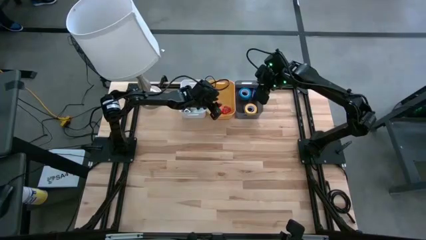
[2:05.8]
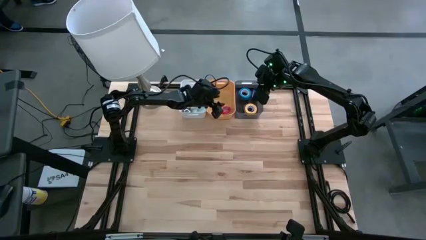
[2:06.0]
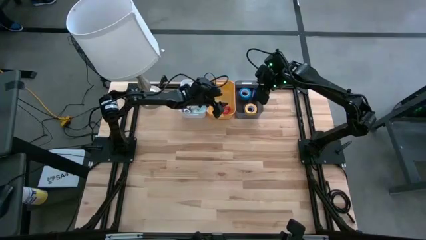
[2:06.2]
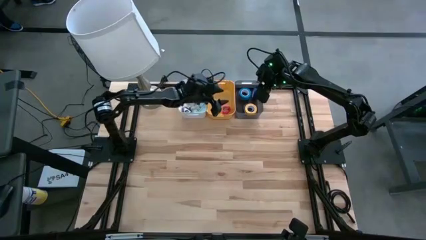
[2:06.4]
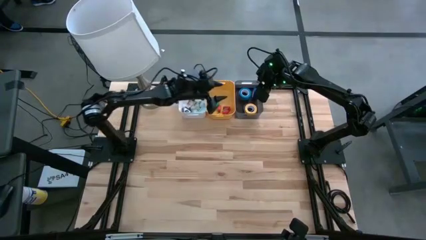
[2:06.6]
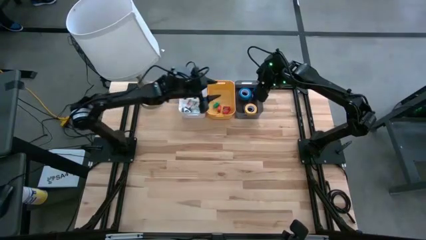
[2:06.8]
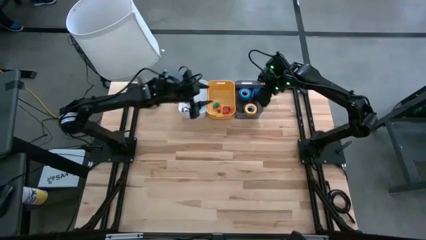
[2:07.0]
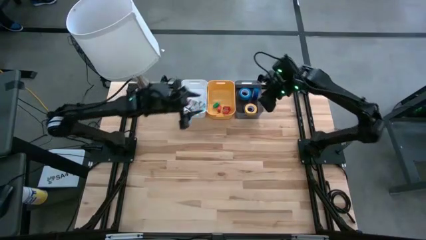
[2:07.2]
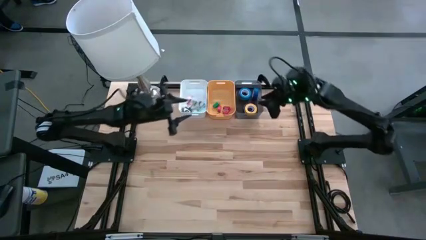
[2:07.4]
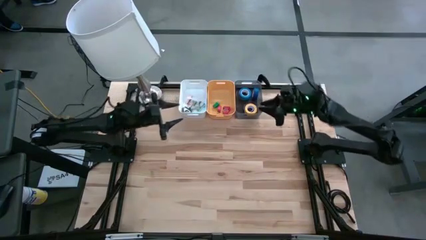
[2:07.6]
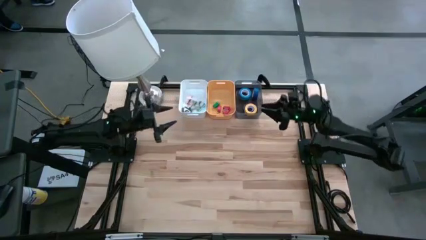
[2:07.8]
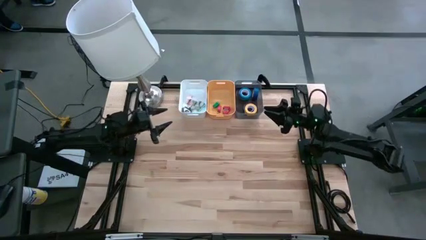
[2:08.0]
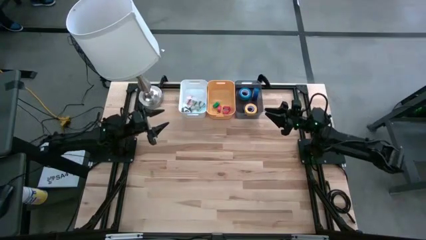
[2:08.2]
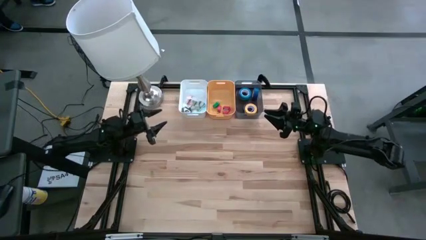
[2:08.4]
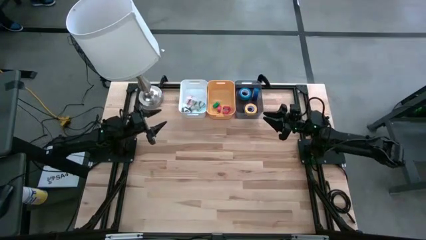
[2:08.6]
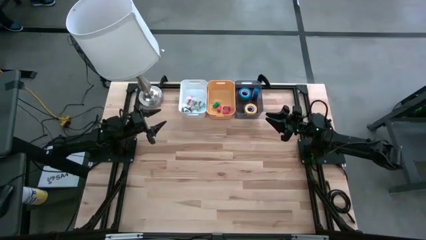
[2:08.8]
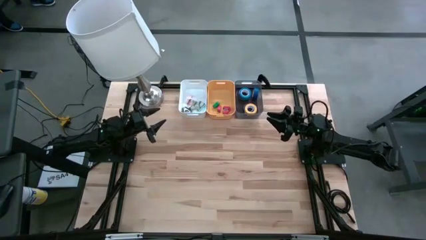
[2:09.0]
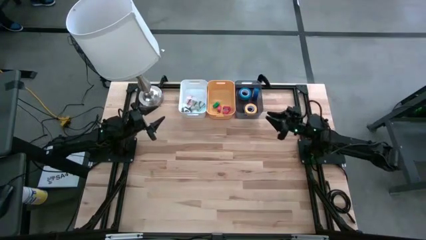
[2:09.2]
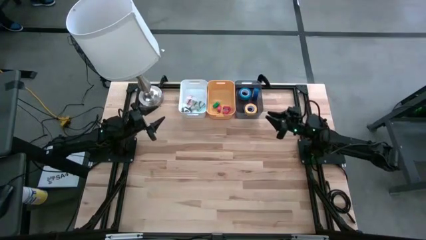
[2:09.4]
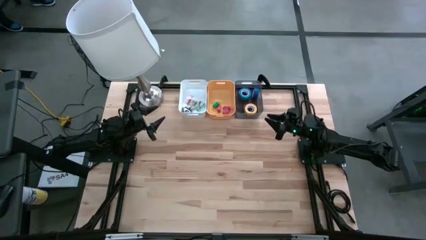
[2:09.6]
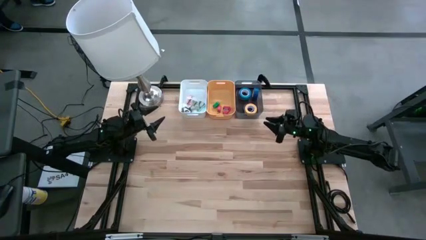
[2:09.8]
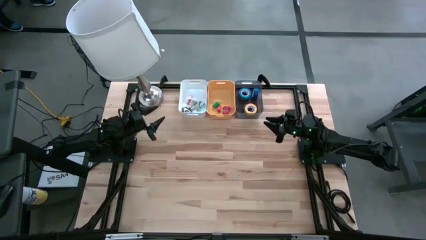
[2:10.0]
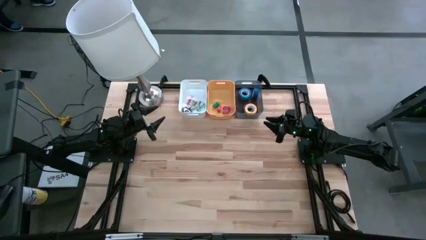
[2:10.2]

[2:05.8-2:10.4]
Task: Pick and place Stapler, Stapler remover, tape
Return to Home Position

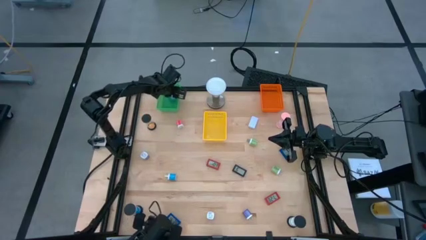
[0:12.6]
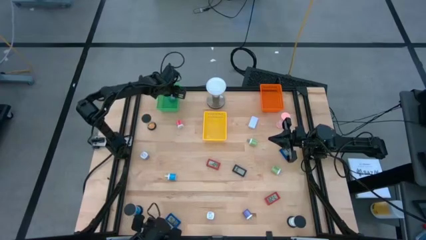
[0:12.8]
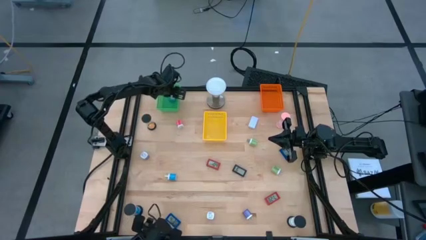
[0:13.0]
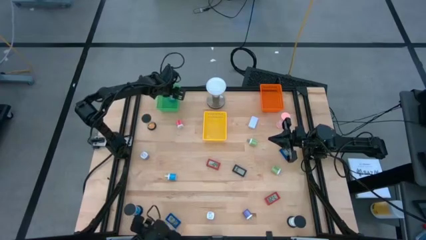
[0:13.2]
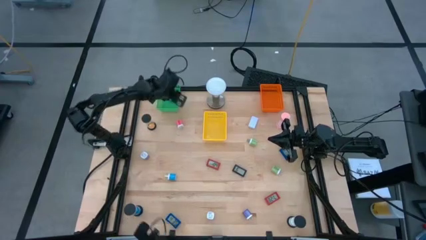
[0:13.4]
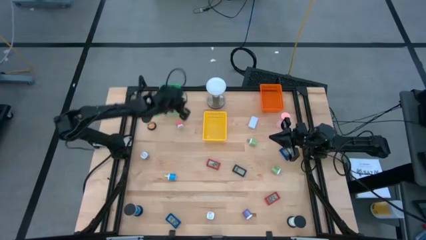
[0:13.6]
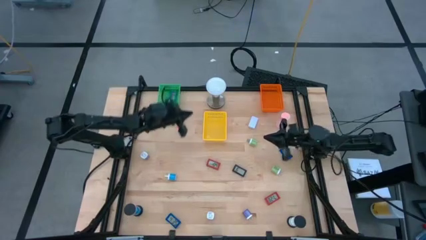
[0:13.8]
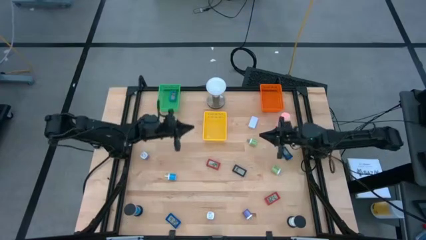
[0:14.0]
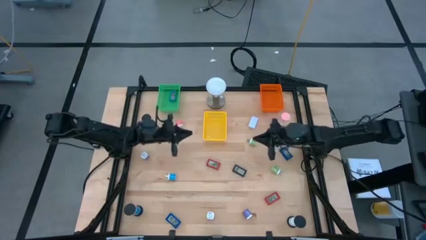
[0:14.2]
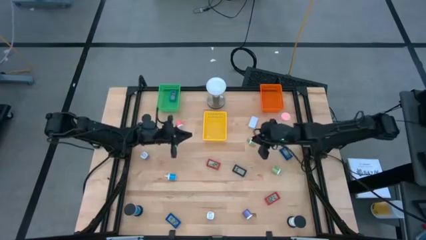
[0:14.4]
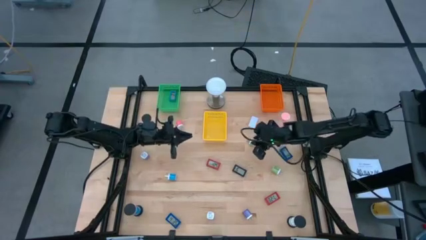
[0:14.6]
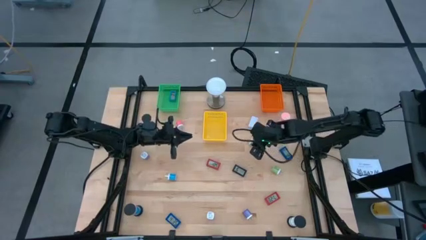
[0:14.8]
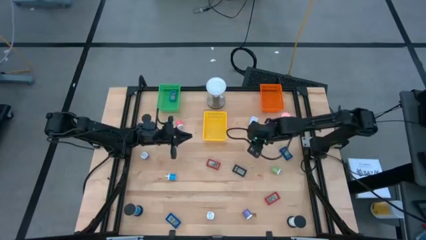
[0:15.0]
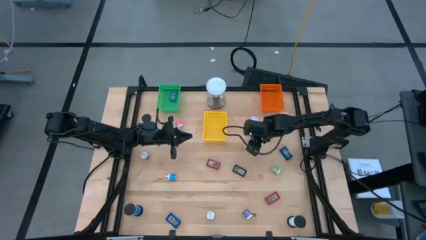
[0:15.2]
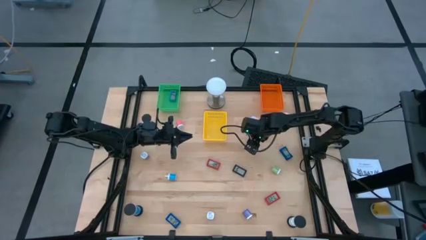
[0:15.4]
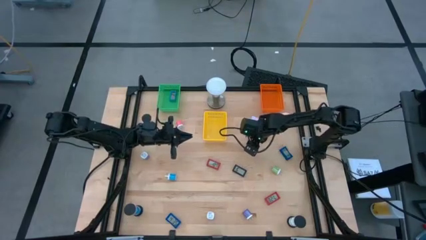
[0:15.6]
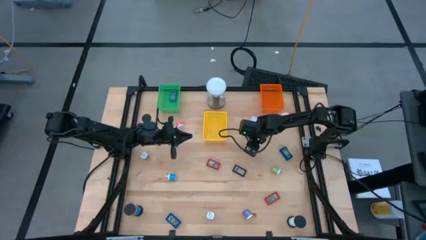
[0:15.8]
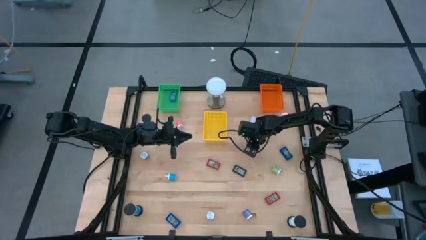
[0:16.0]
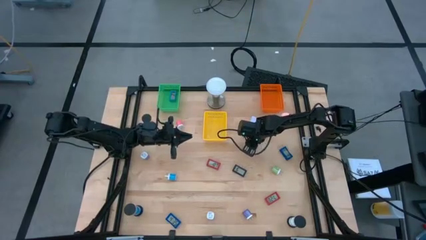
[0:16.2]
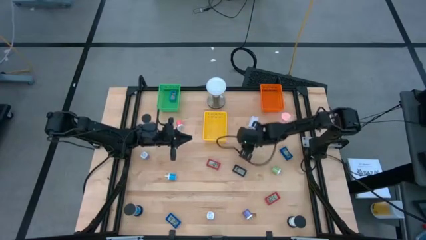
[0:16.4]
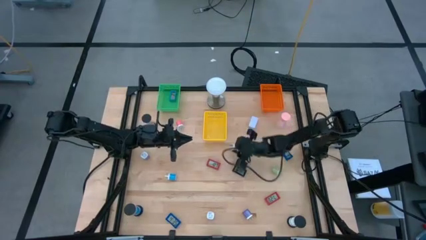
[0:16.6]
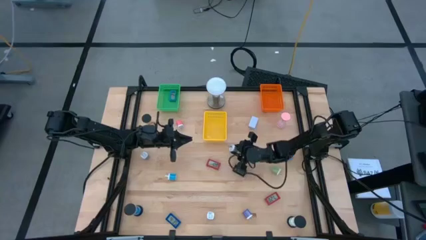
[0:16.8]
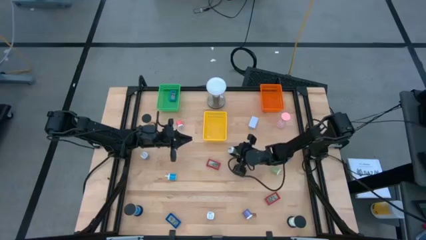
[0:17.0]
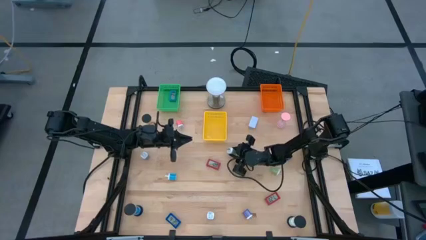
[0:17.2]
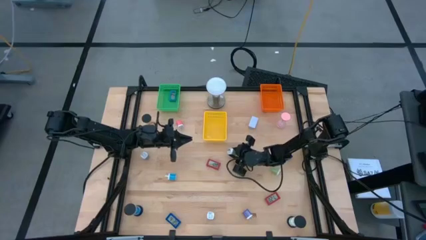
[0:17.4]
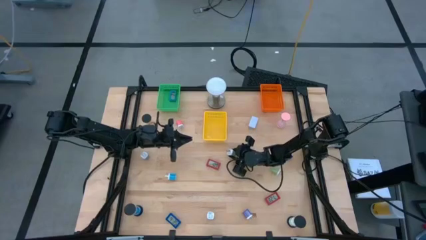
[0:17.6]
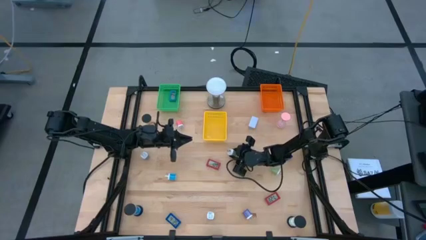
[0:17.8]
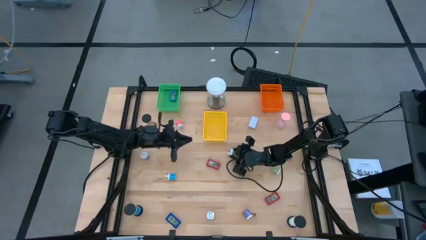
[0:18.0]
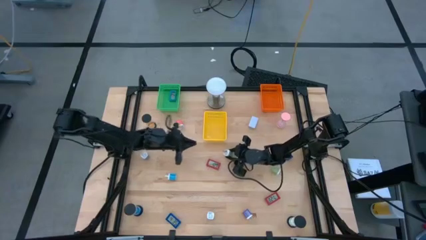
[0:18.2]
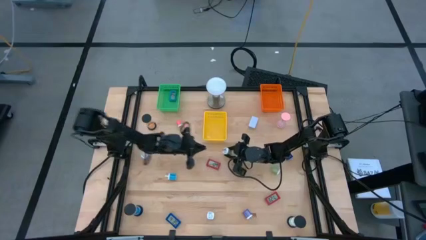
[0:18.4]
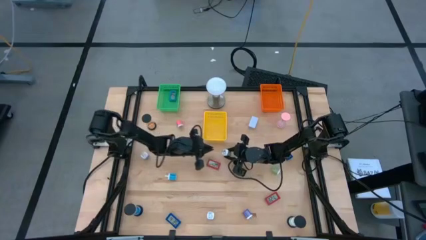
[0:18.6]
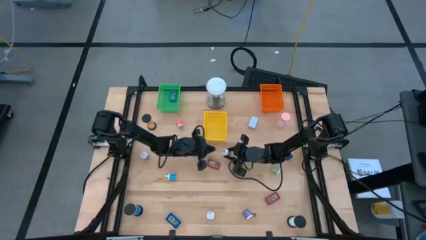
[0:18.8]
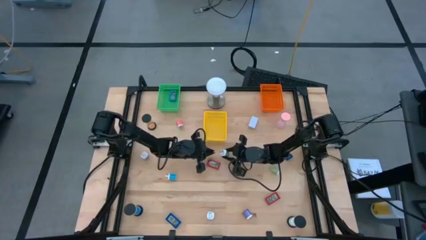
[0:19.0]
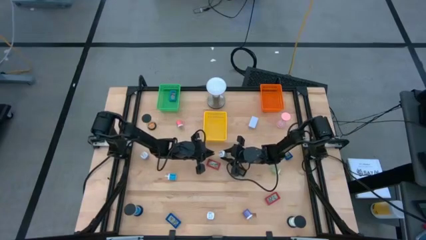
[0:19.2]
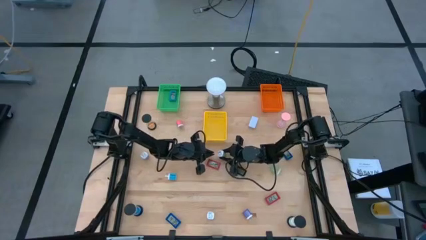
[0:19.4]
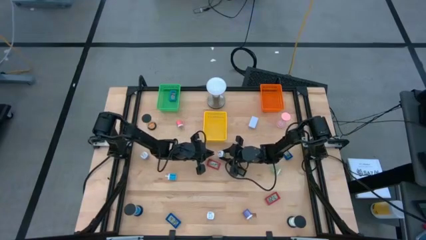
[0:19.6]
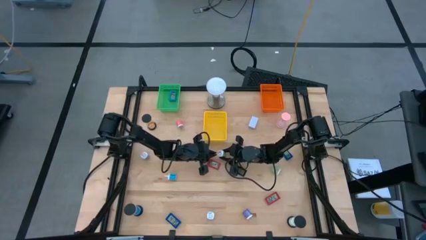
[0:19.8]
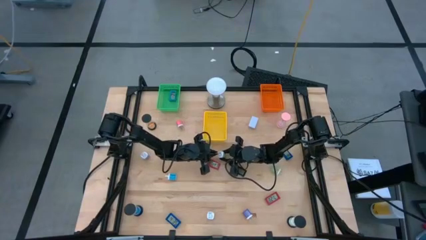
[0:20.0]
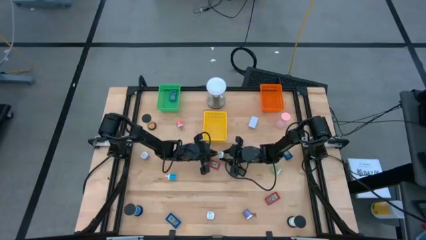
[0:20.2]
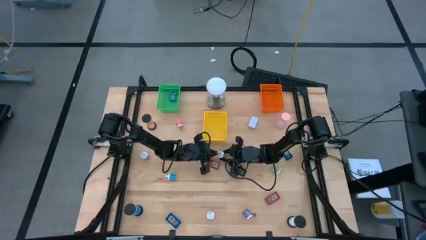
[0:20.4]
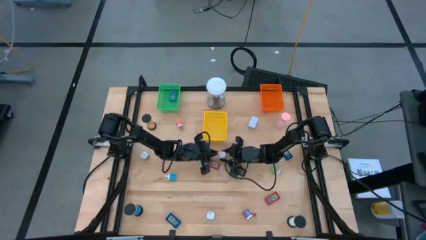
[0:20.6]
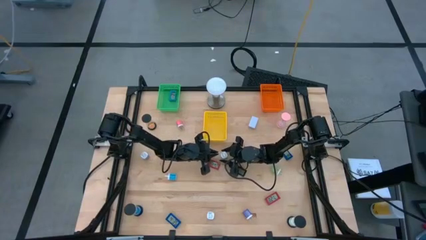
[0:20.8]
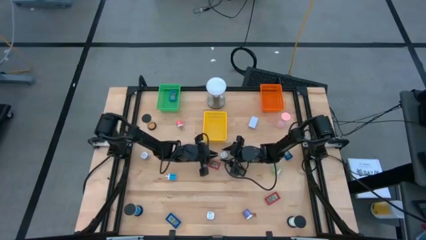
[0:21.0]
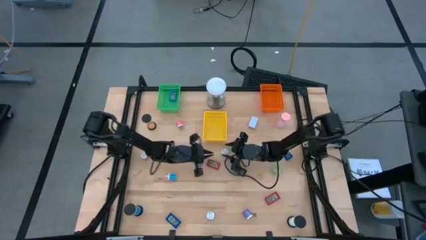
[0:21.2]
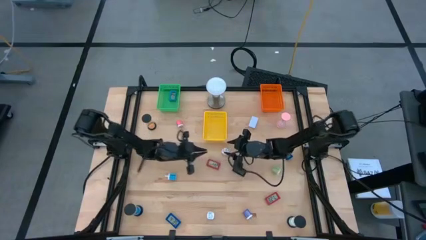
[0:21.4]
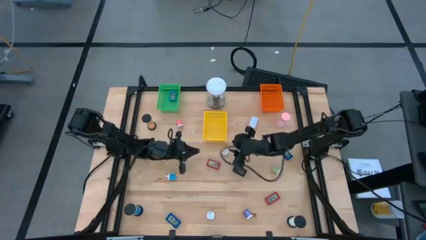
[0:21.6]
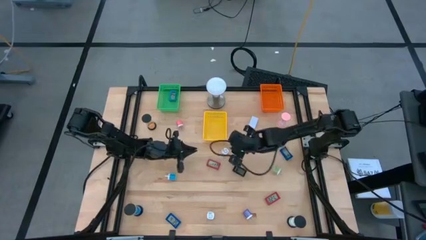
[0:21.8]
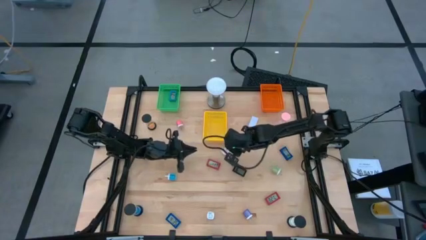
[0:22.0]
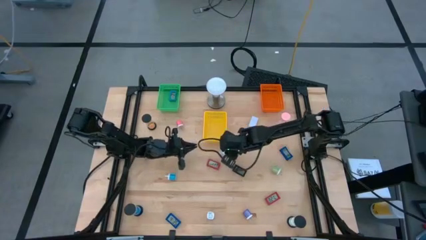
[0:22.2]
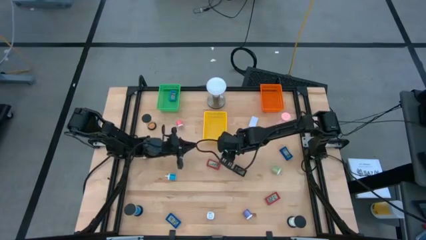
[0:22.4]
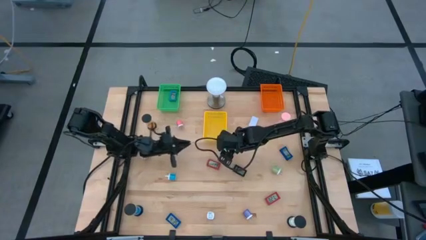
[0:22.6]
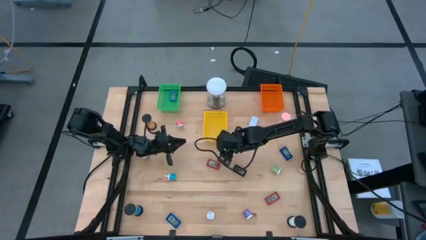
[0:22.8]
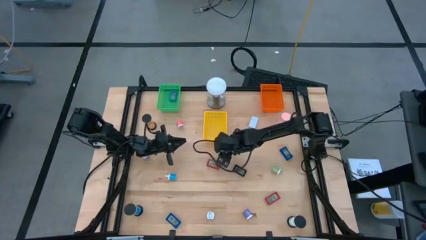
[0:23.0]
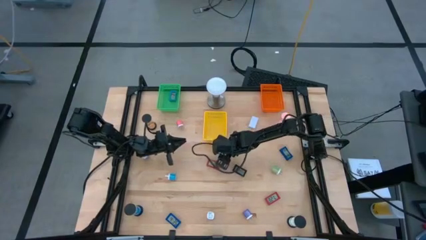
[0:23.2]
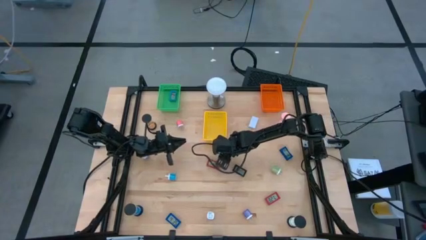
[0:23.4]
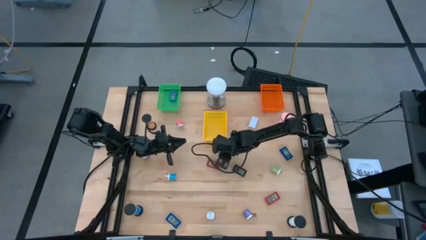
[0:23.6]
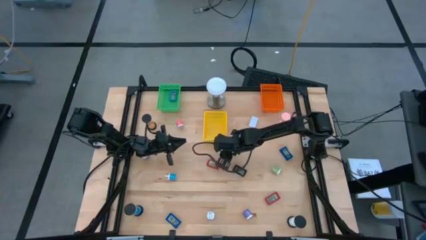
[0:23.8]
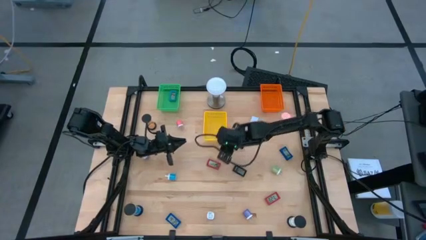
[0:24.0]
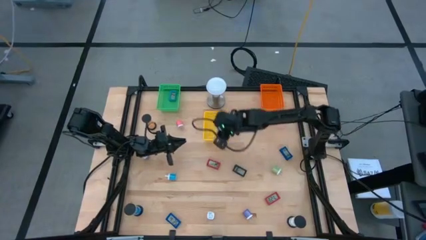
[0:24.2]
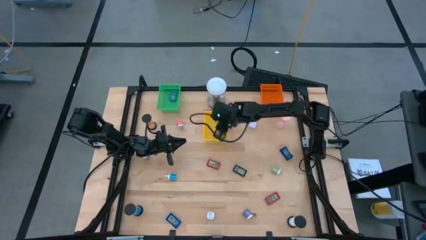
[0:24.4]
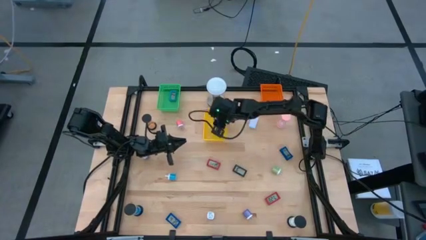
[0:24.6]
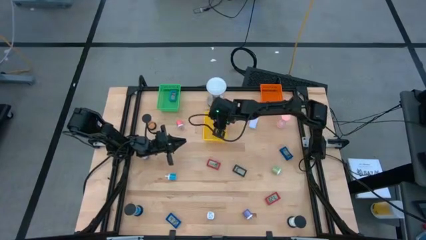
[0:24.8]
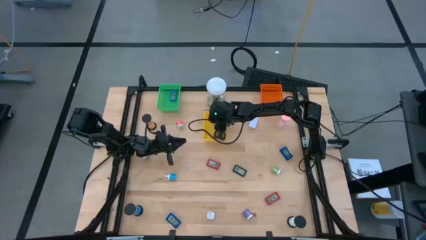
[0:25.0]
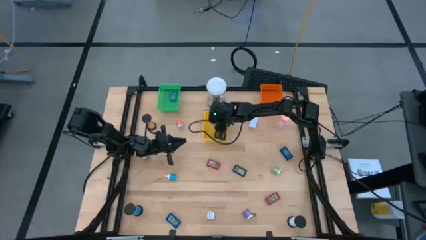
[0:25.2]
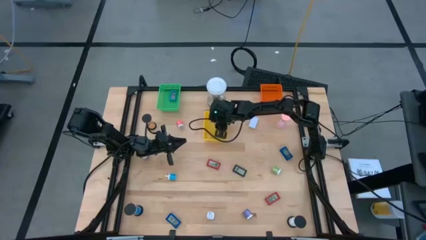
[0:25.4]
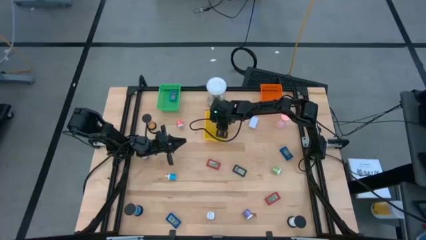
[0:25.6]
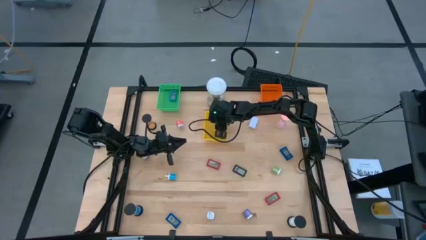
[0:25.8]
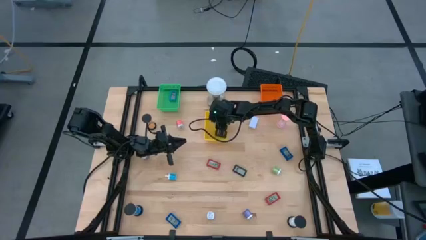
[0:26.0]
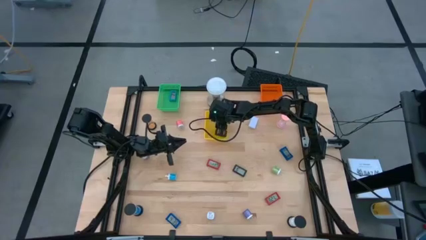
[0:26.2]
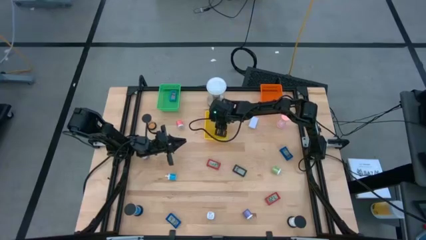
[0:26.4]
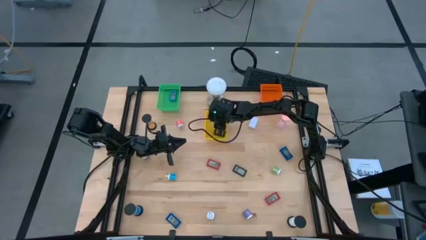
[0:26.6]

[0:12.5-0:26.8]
Task: Pick & Place Office items
Put the top green charger adapter into the yellow bin
